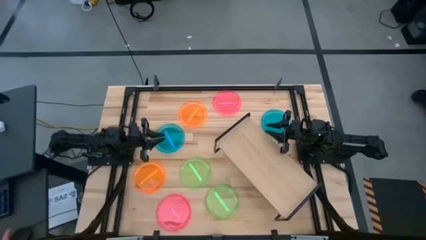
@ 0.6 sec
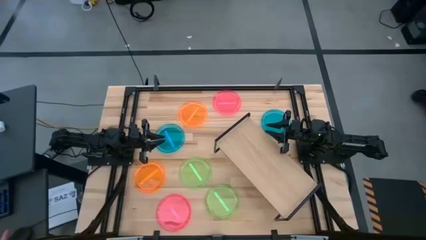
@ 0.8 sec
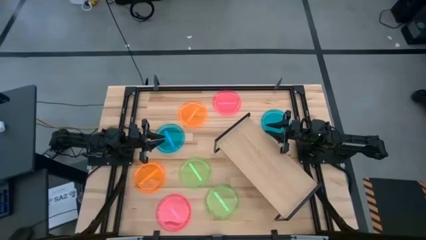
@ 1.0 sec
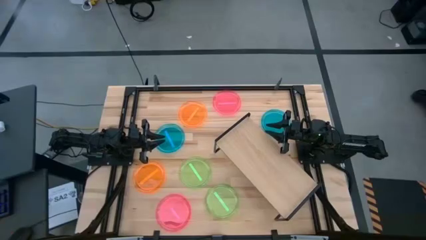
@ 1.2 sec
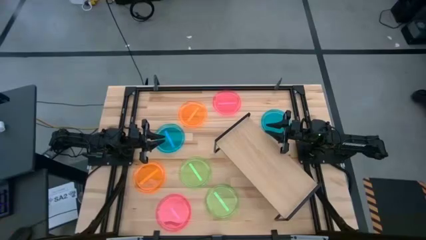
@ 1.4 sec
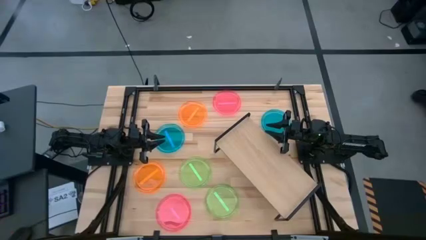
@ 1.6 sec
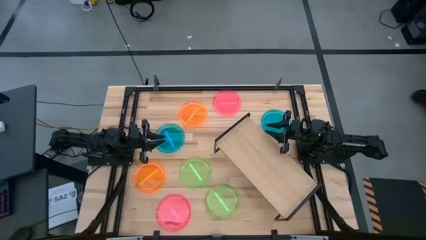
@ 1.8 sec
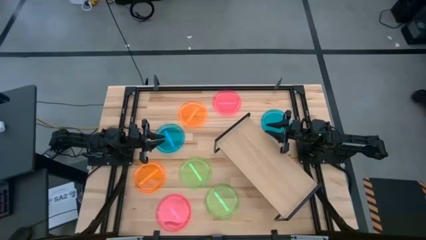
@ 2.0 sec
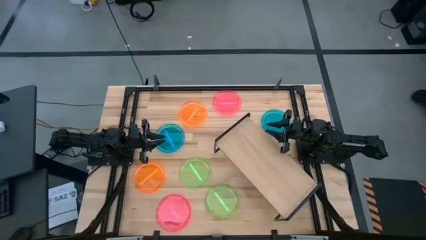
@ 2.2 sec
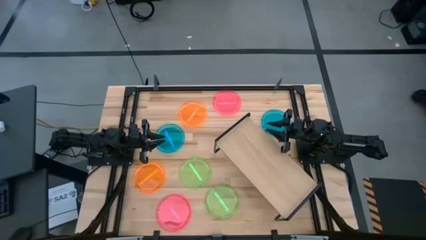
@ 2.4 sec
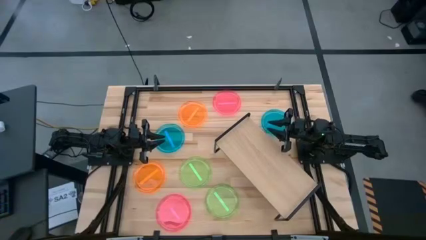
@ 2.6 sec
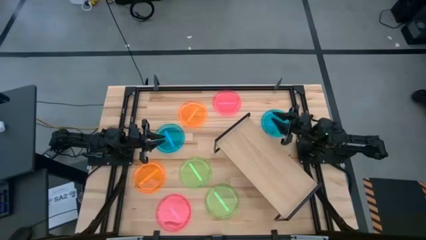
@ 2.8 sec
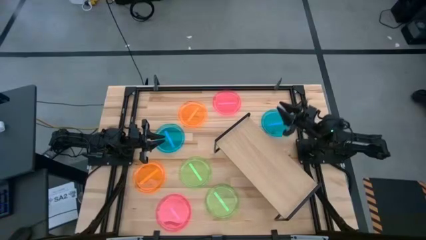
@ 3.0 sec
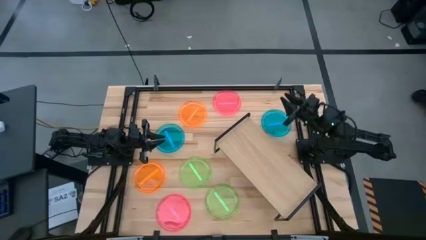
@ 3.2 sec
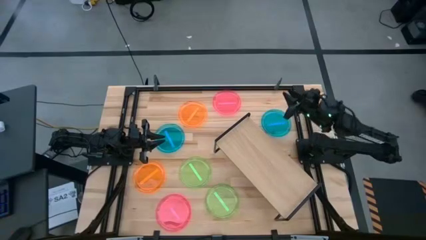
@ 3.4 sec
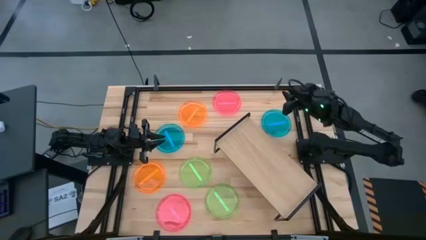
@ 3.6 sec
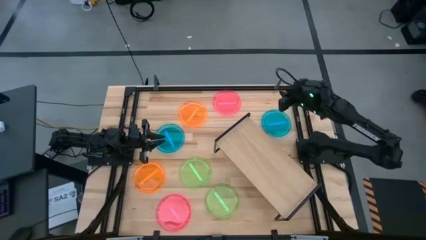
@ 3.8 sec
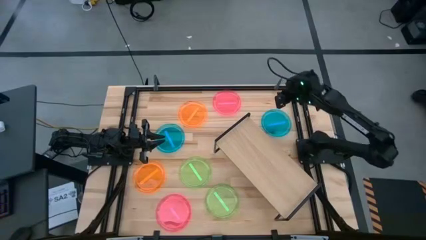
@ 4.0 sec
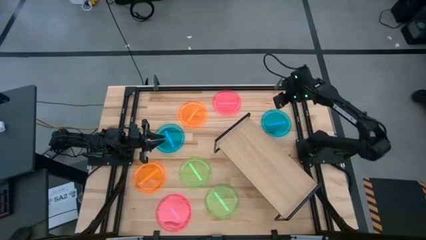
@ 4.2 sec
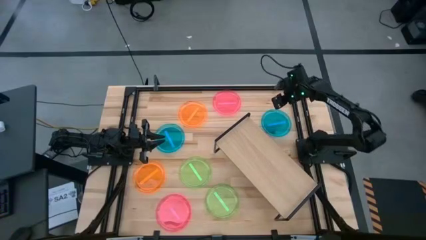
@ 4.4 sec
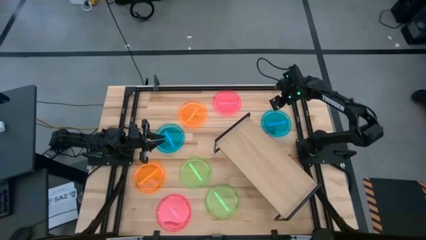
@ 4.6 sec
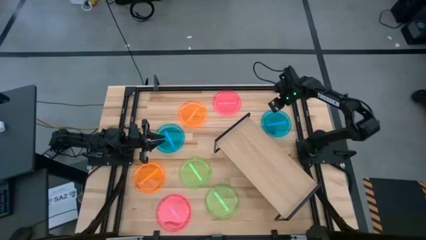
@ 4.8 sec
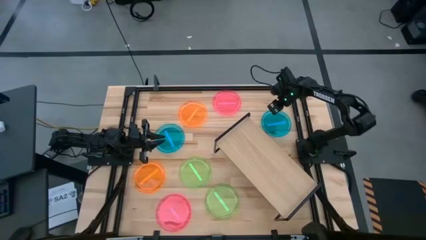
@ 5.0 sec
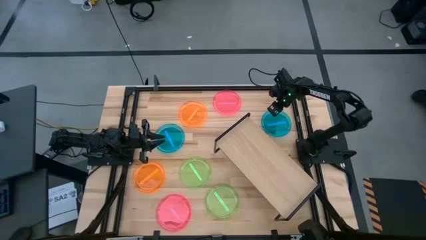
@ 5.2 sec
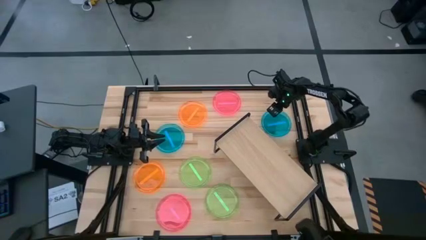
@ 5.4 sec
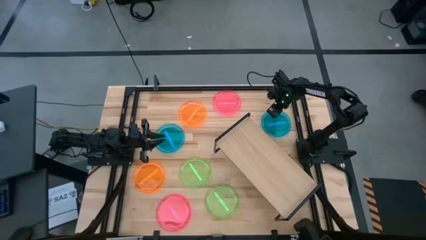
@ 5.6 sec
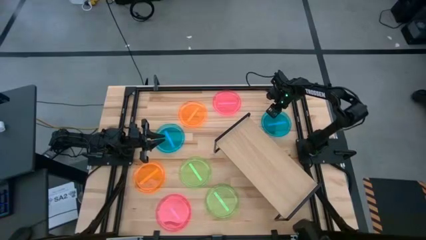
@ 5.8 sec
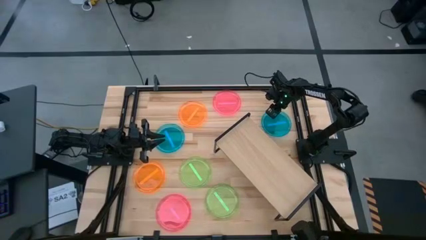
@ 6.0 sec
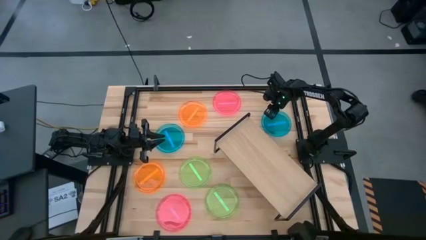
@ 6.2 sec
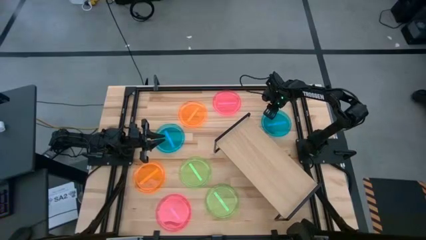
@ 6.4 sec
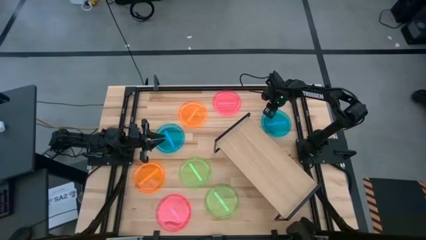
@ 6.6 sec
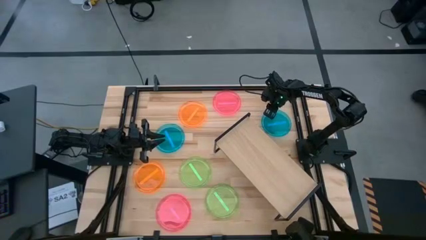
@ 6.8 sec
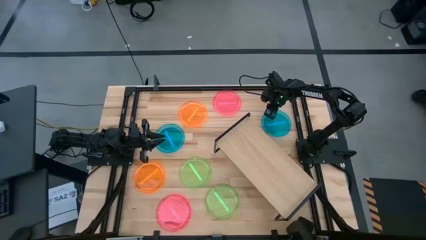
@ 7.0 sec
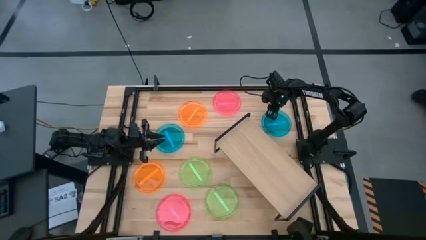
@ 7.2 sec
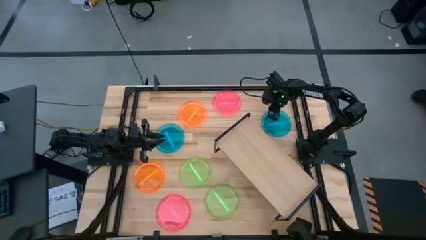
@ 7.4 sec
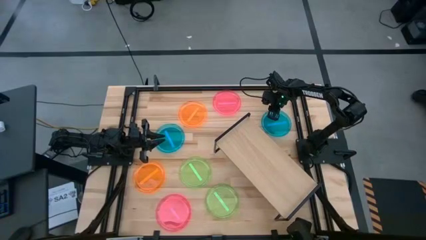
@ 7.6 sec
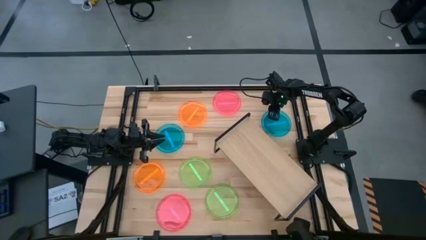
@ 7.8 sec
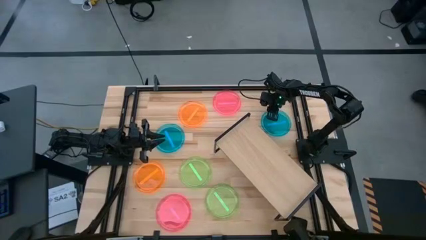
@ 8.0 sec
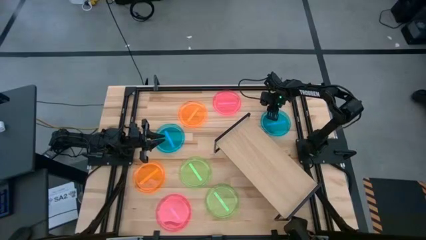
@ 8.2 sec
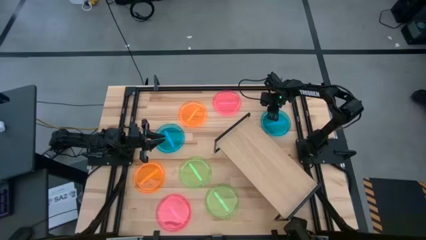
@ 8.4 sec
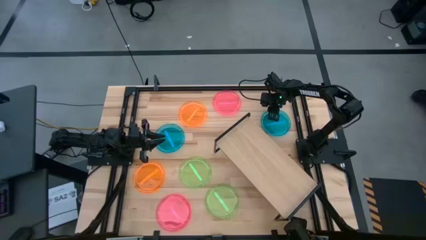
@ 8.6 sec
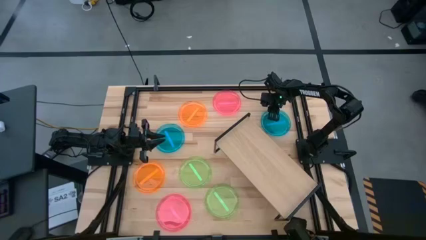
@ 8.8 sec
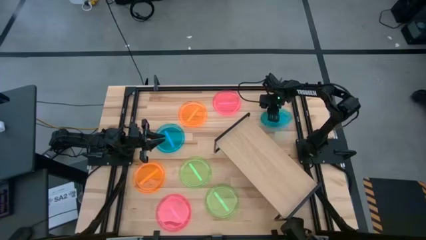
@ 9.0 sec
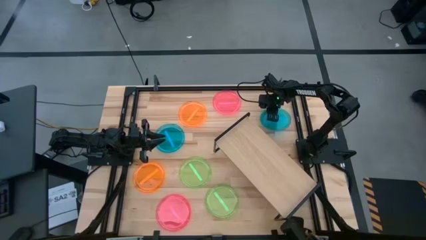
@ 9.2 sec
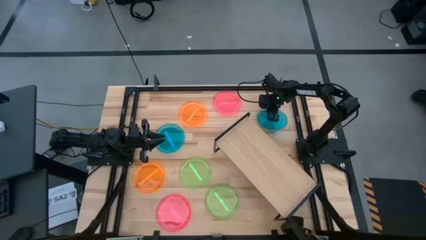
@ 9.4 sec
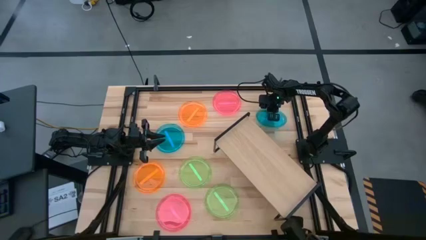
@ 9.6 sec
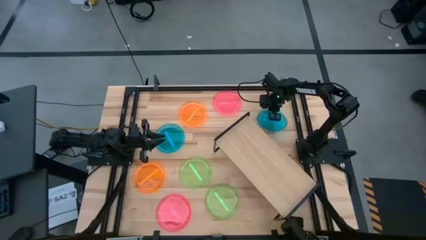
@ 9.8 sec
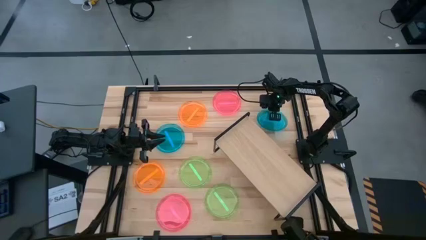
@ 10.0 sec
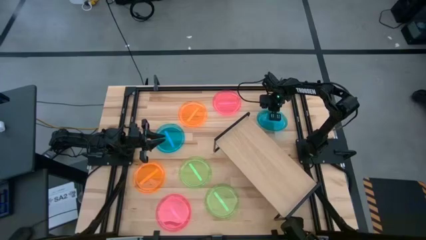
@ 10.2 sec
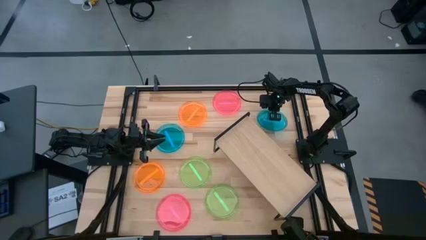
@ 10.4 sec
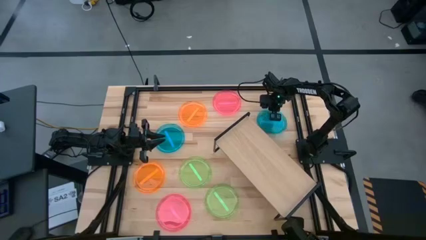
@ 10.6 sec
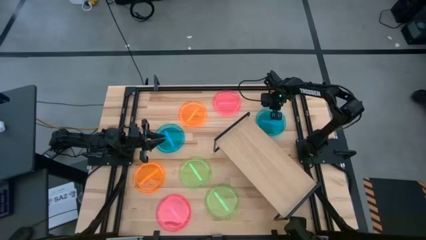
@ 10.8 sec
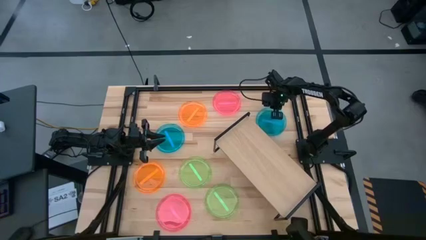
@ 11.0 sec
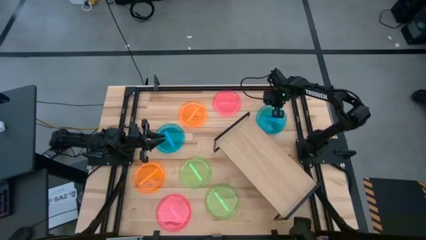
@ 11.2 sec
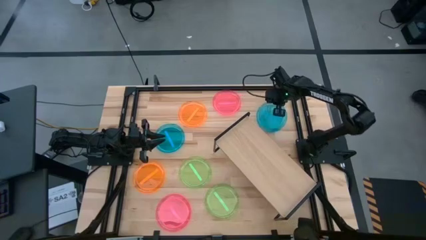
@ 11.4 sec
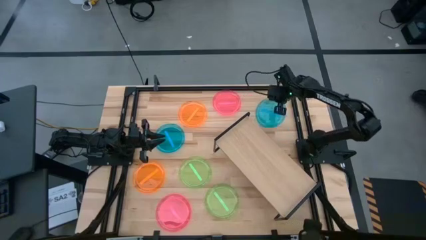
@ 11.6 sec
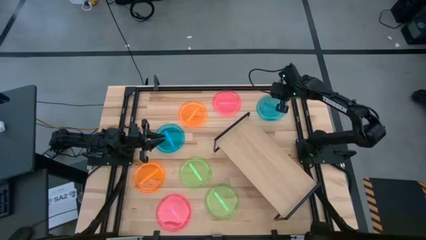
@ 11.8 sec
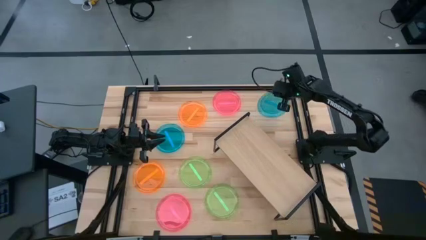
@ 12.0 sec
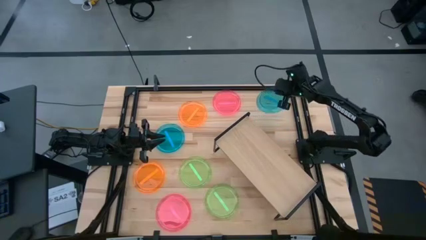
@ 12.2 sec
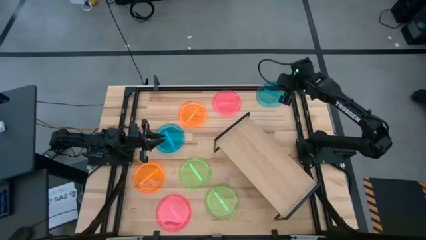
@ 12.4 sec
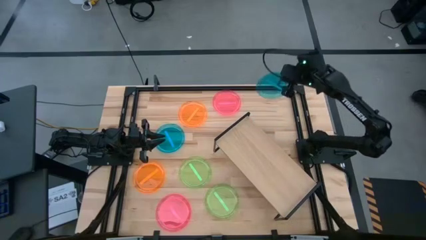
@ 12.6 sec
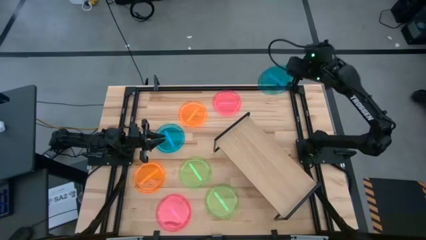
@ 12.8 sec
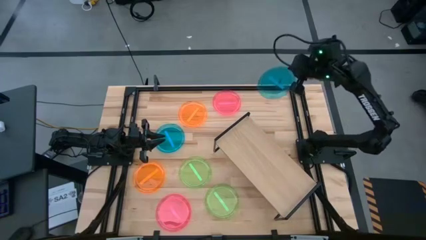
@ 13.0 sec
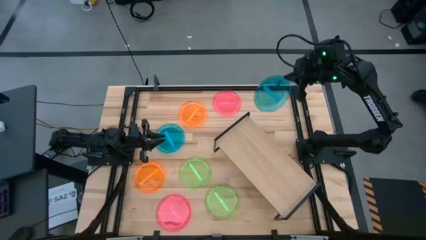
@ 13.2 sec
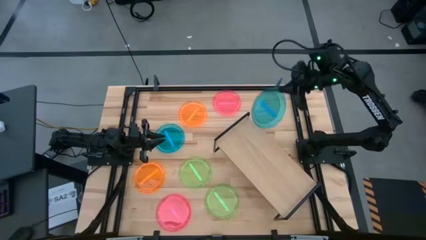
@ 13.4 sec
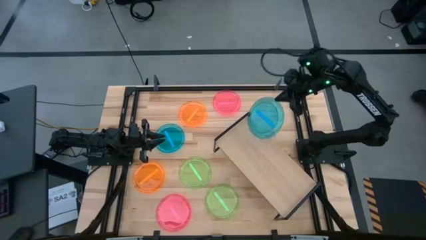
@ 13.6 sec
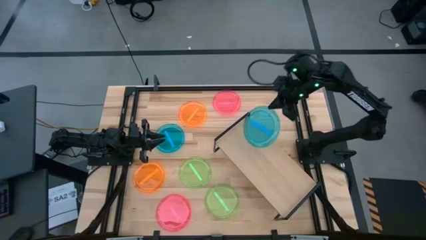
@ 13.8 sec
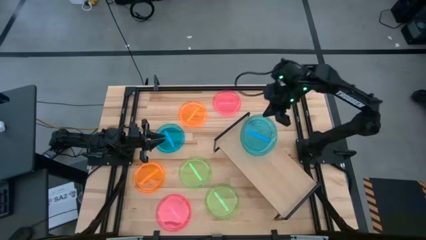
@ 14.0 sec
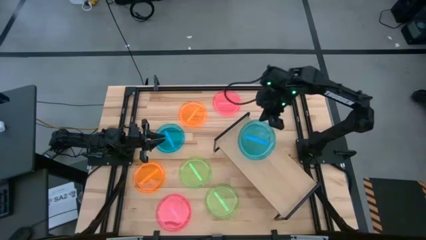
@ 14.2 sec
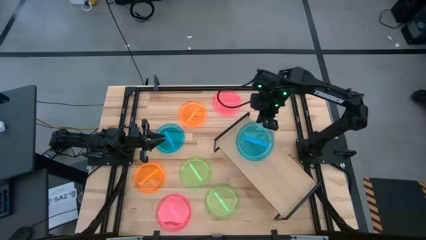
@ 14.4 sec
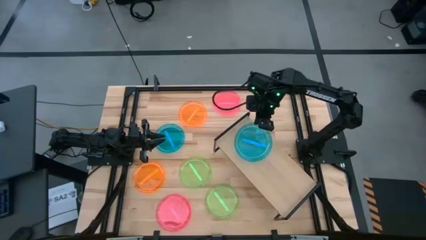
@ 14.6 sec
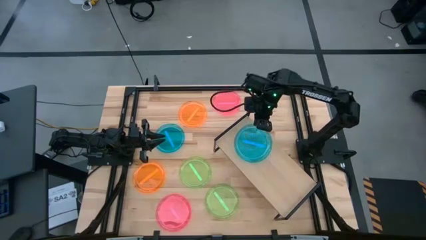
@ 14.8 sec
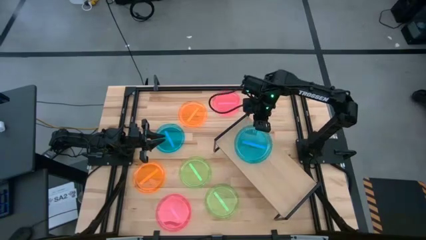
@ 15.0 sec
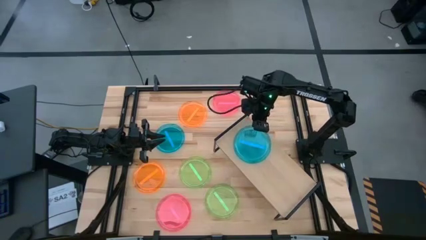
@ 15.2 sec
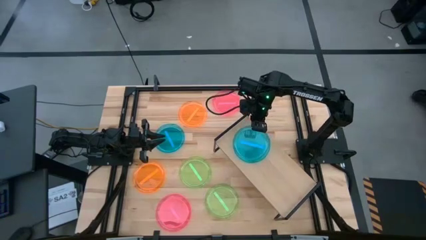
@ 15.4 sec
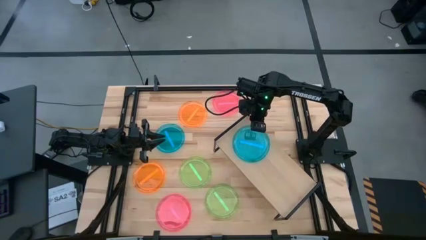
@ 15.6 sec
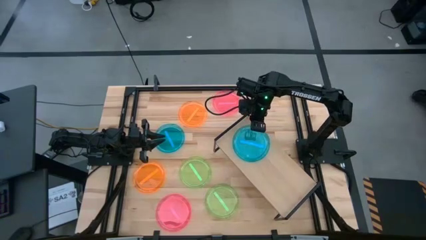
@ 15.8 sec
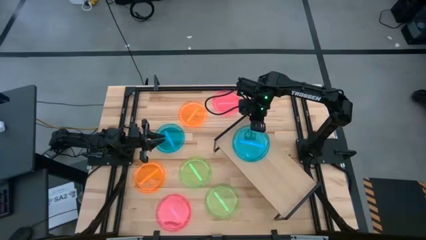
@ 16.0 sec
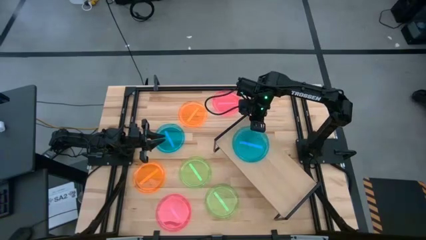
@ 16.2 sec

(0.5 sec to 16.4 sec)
Task: Place and stack plates onto a shelf
Put the right blue plate on the shelf
